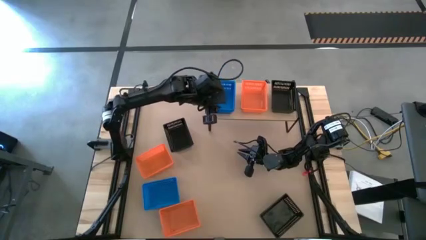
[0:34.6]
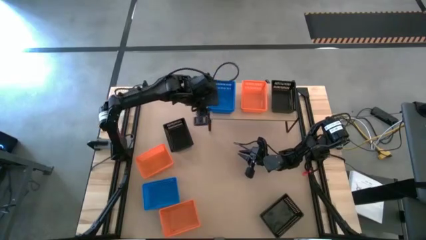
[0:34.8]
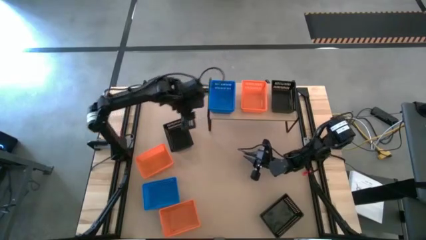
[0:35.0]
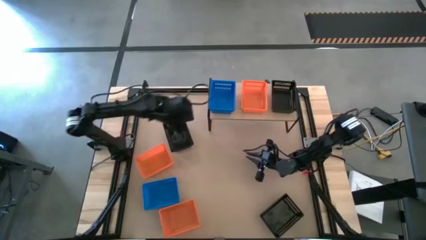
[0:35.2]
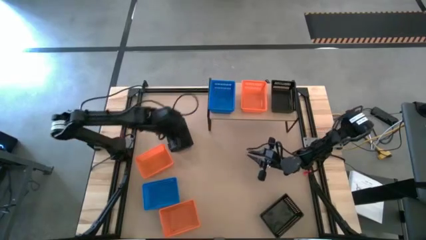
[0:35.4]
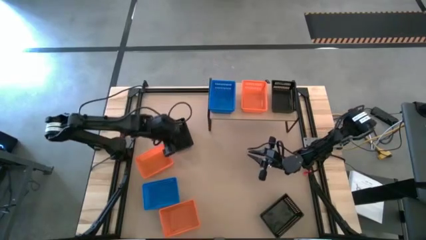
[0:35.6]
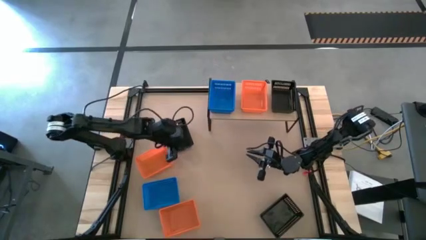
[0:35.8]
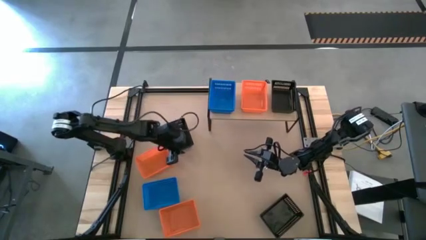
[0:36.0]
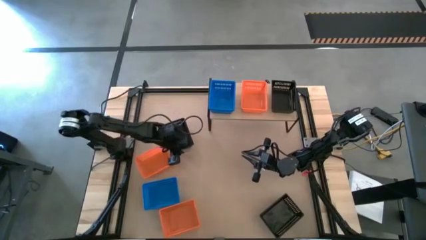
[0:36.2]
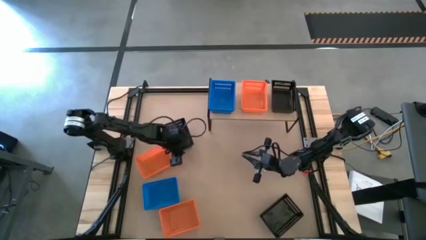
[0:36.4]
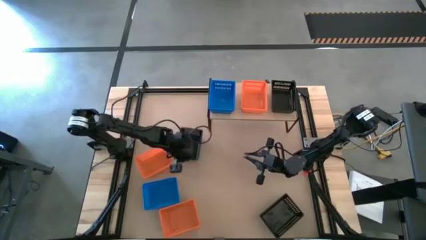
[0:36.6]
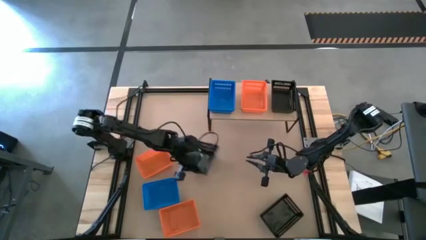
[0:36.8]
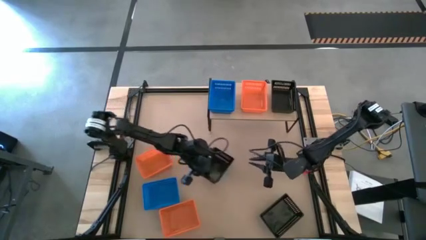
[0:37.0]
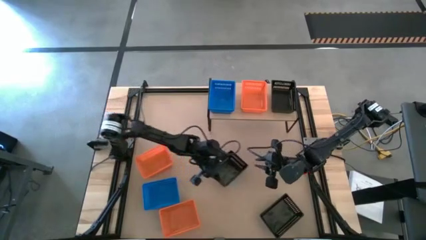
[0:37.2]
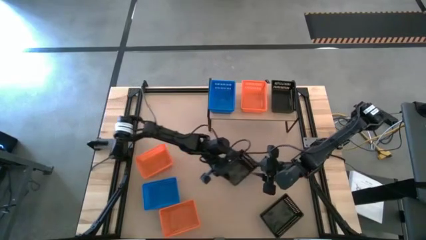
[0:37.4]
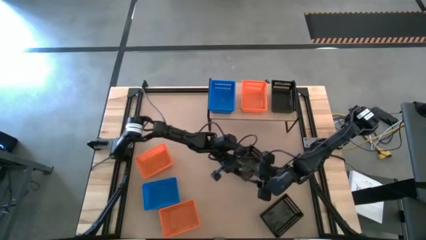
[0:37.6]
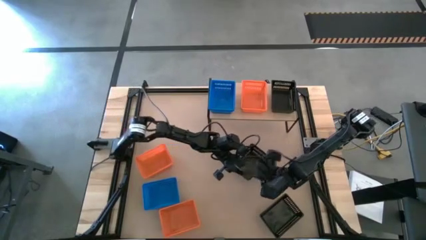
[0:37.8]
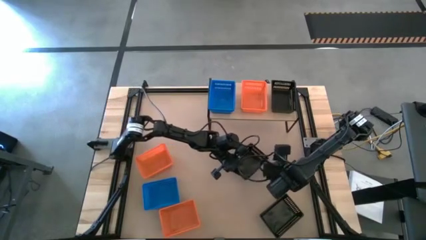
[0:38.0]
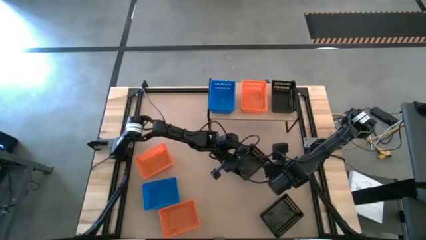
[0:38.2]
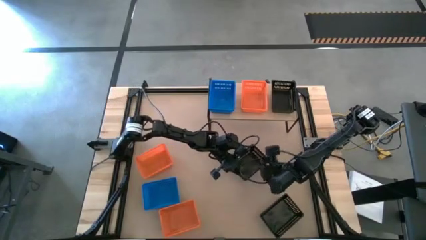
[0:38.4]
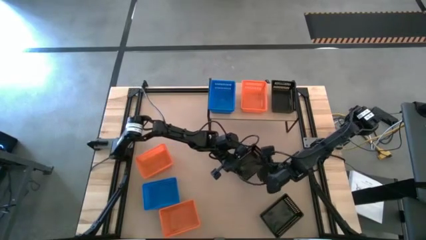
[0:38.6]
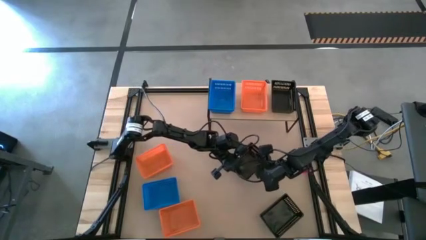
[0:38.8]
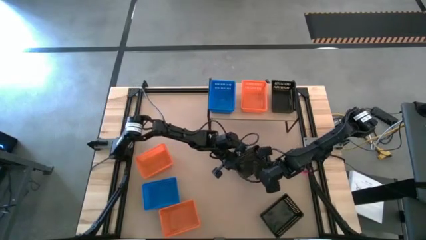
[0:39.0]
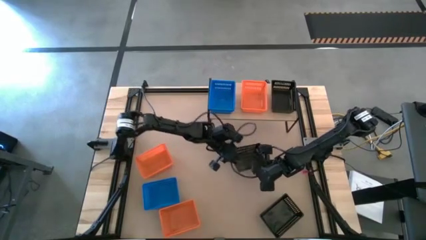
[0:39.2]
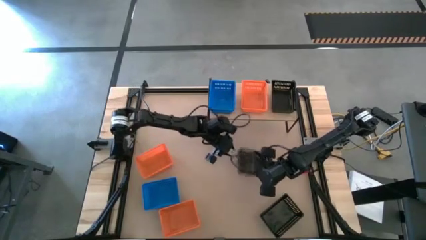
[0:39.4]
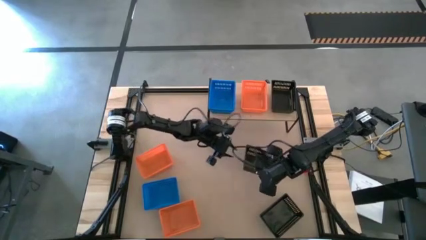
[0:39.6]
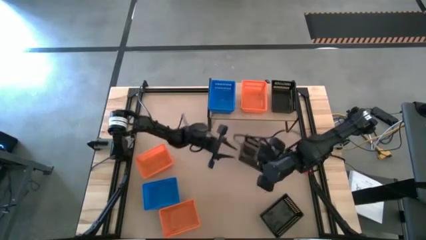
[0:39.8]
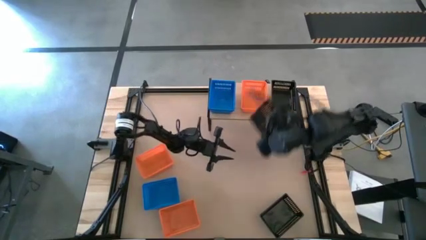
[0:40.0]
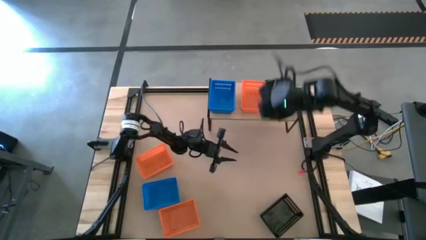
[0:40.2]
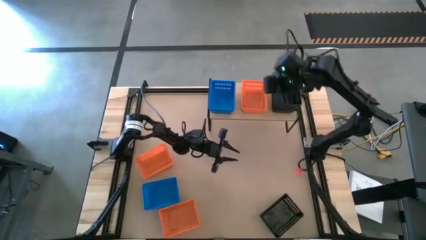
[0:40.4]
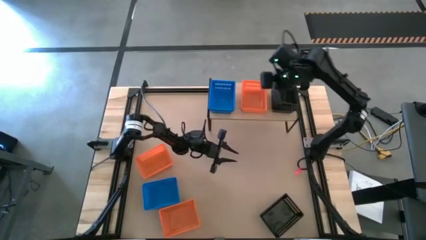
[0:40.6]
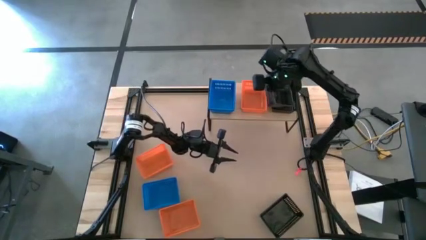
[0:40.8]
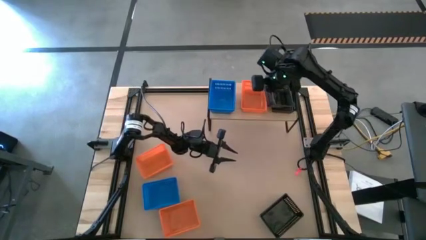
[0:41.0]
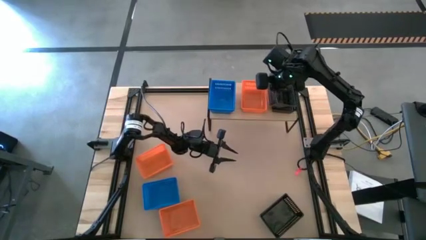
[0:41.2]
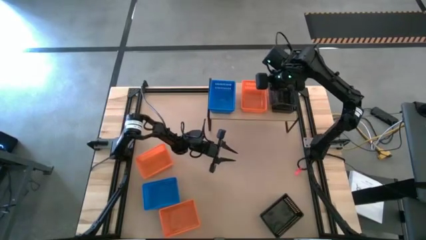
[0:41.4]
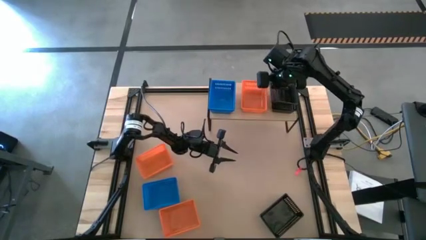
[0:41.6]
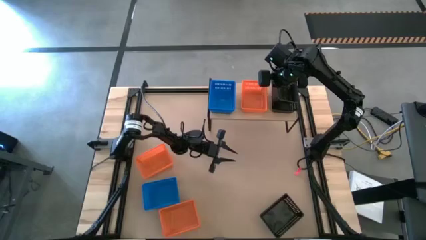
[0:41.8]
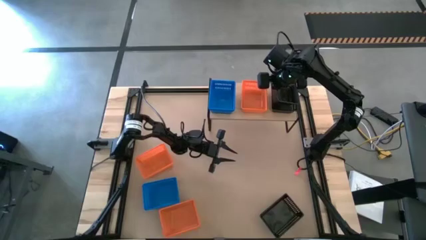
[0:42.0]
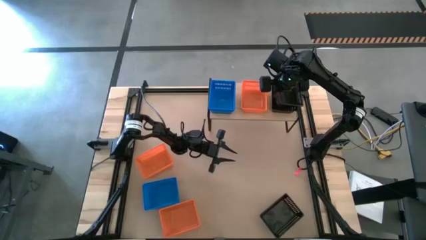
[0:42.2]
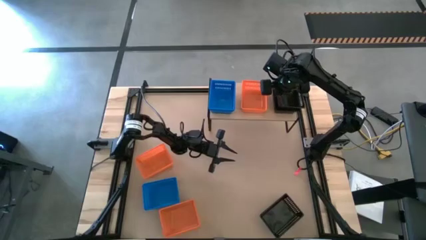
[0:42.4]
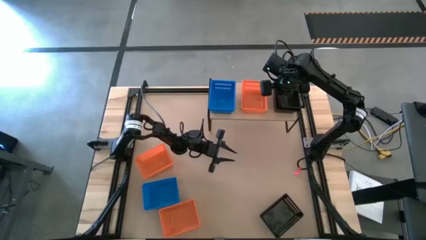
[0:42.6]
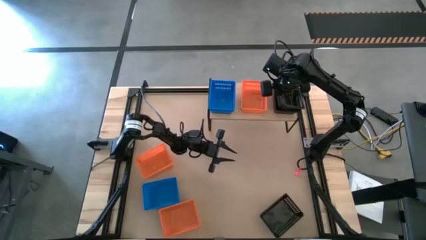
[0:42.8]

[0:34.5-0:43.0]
Task: Stack baskets on shelf by color
Stack the top black bin on top of the other black bin on the shelf

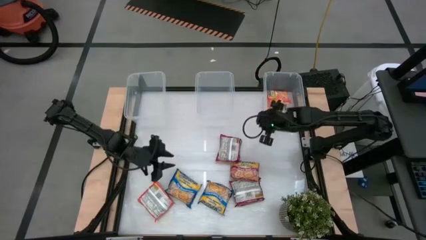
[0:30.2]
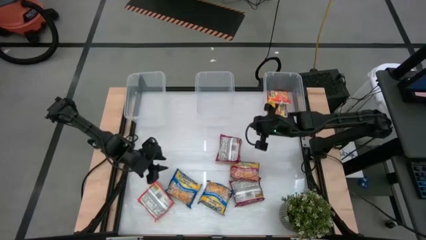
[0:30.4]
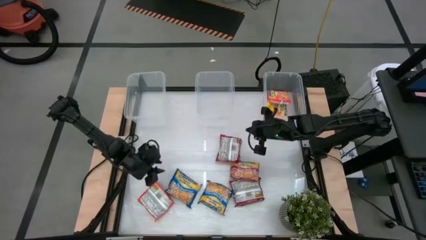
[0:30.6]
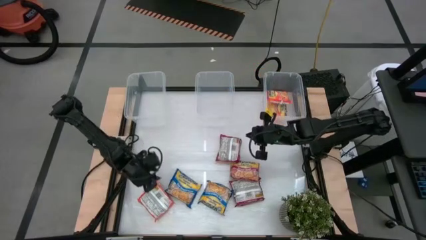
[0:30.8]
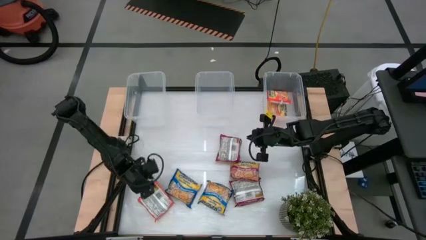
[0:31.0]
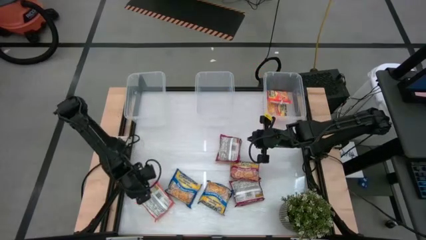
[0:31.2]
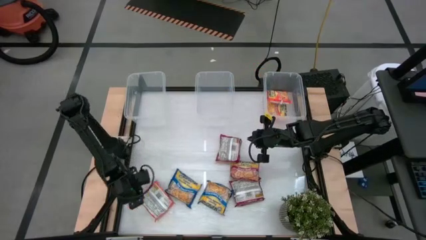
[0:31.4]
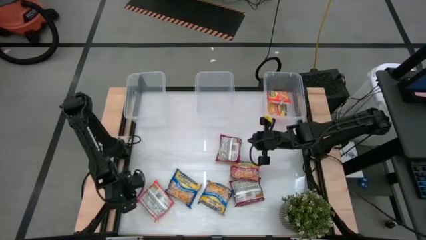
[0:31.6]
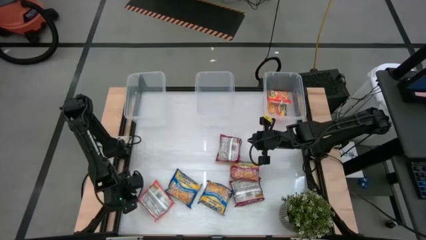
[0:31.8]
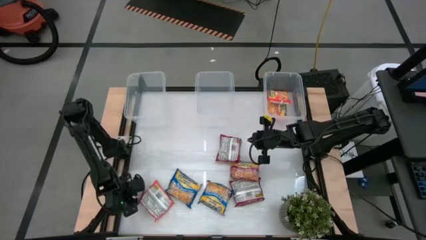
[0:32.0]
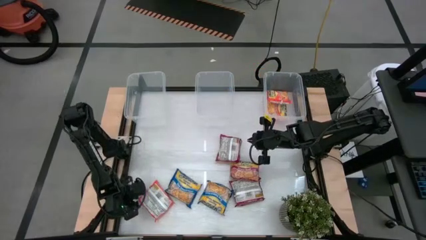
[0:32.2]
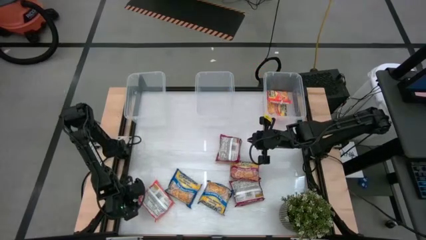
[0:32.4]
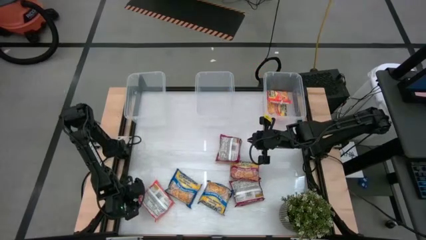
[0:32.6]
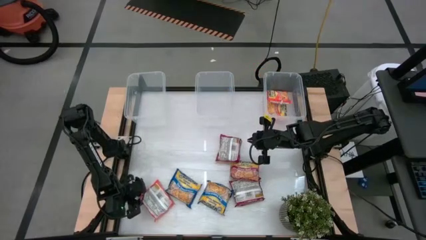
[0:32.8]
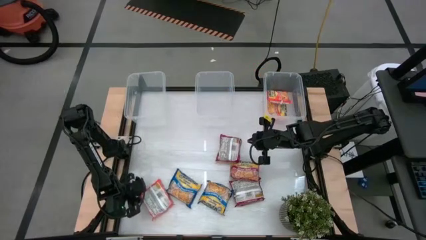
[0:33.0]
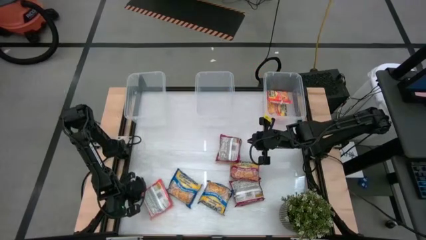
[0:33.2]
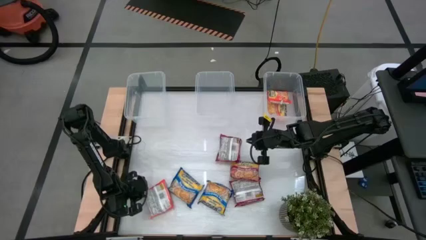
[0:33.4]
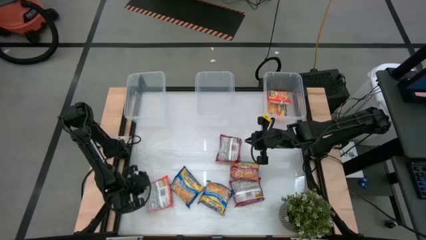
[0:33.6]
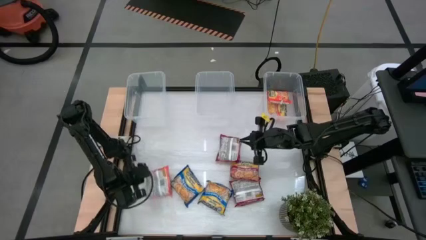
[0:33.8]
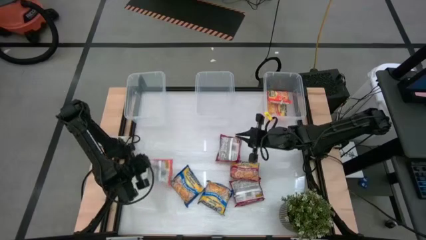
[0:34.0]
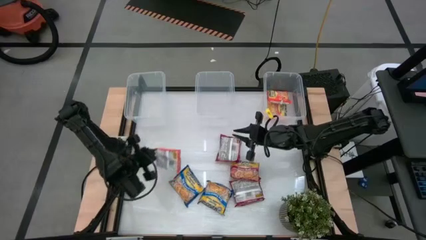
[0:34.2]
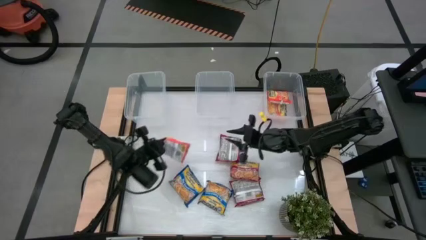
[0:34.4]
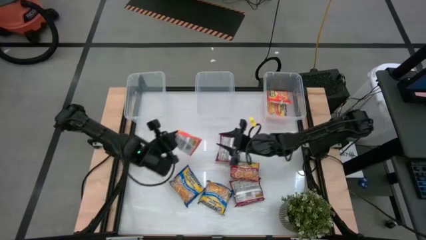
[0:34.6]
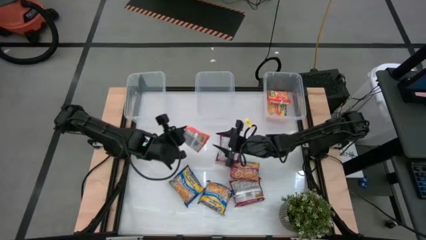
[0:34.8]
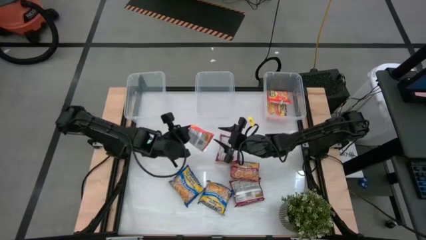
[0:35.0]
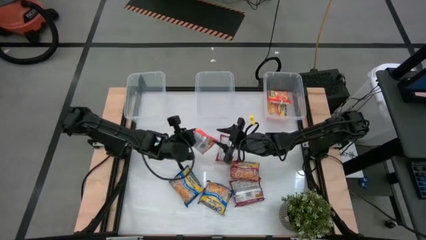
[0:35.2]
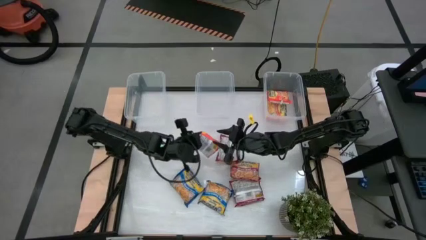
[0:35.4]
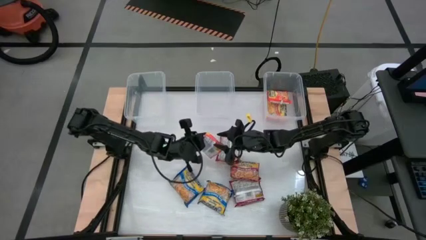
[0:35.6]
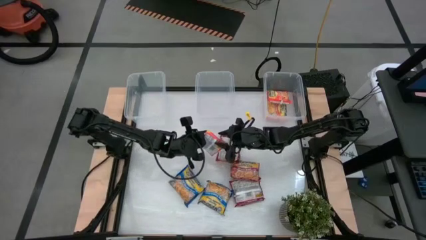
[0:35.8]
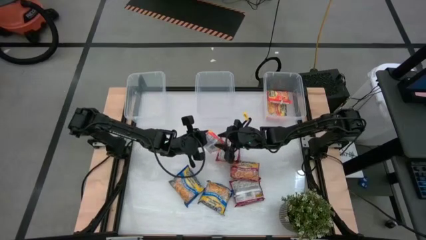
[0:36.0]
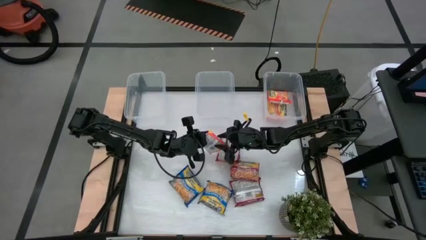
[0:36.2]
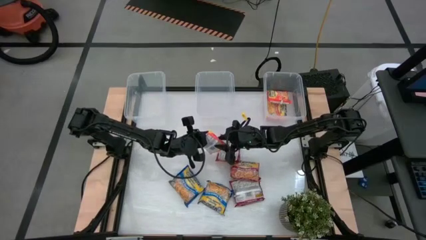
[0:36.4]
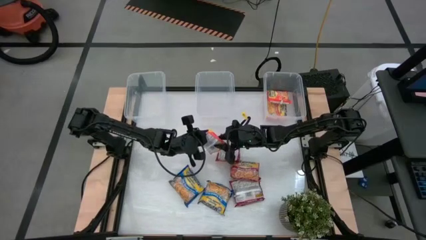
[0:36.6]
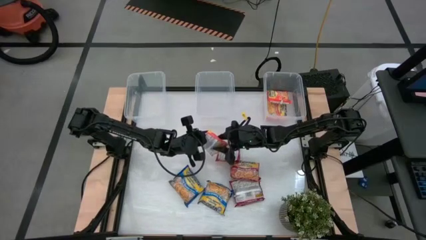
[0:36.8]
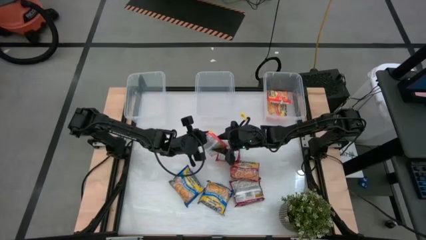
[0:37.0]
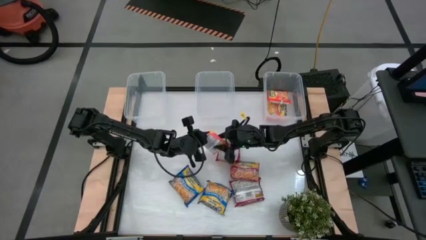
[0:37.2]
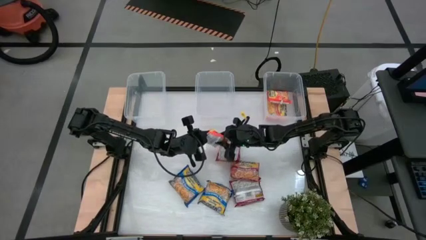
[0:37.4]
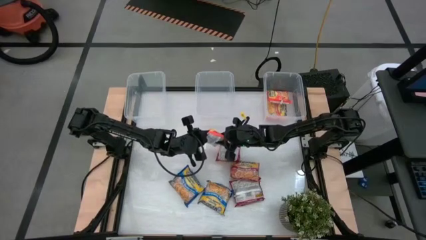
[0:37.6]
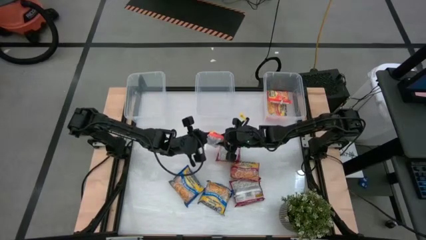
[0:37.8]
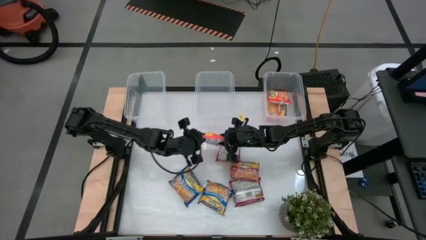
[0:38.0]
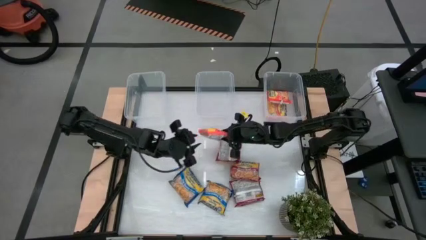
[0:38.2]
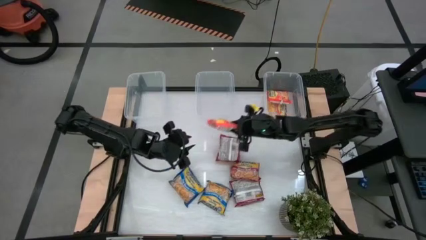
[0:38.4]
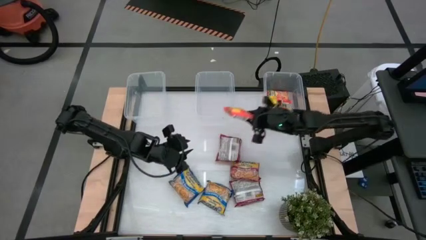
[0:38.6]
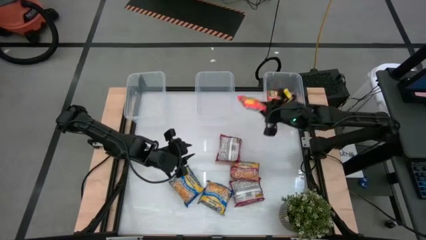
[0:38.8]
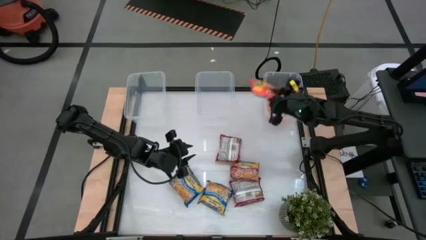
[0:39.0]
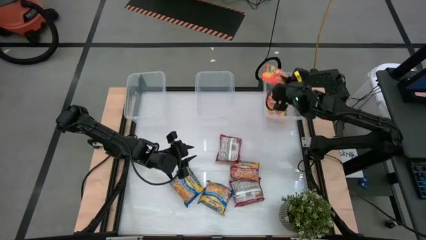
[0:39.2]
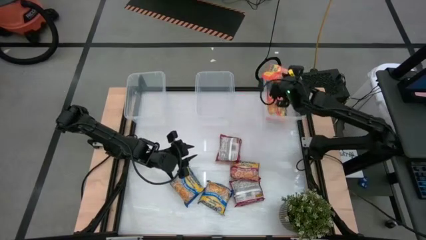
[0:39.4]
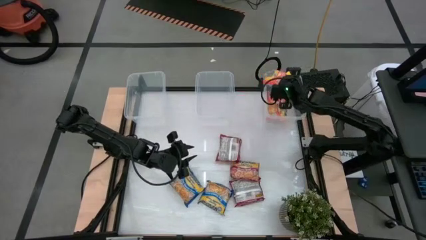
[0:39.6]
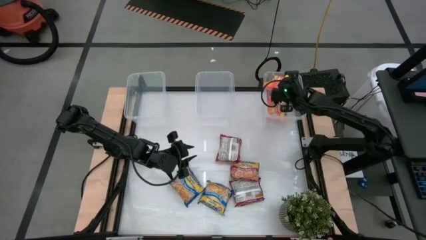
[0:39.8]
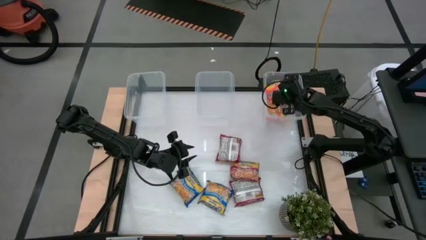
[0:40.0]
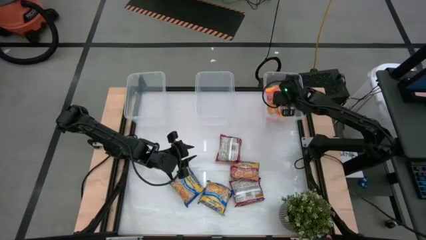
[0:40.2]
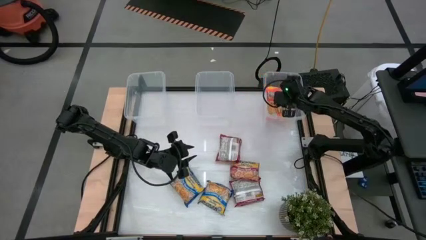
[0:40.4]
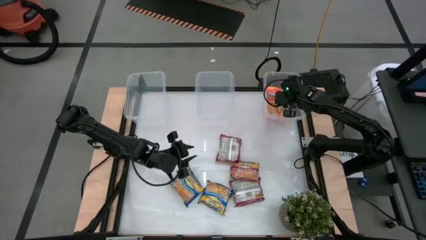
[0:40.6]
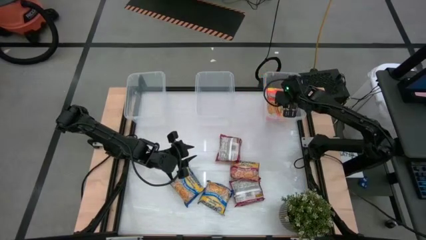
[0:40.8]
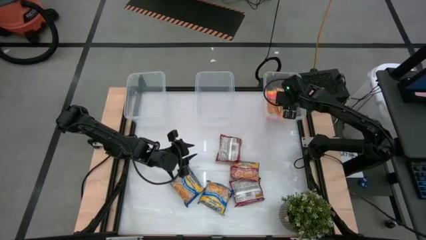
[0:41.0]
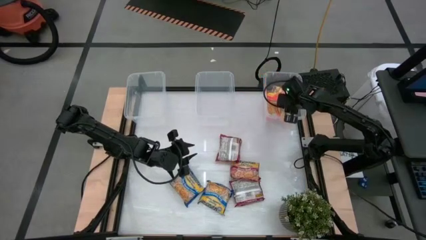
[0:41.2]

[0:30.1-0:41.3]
Task: Sort Maruchan noodles
Put the orange noodle pack into the right transparent bin
